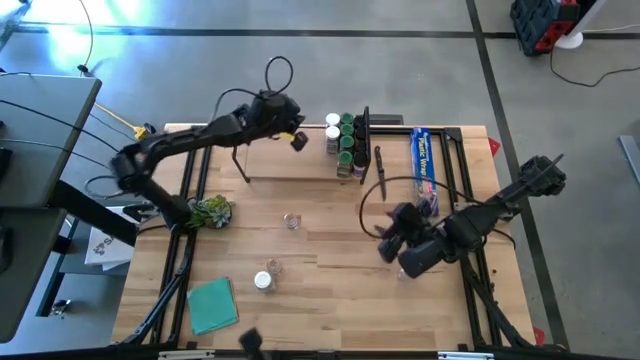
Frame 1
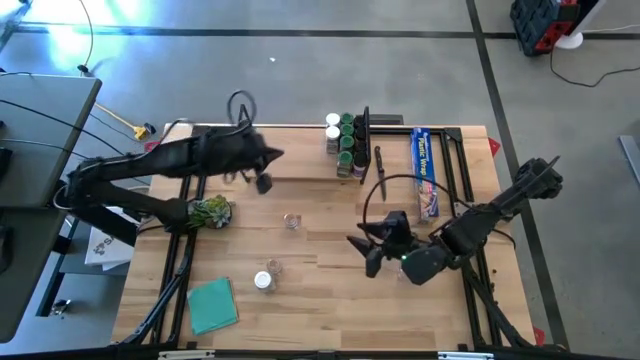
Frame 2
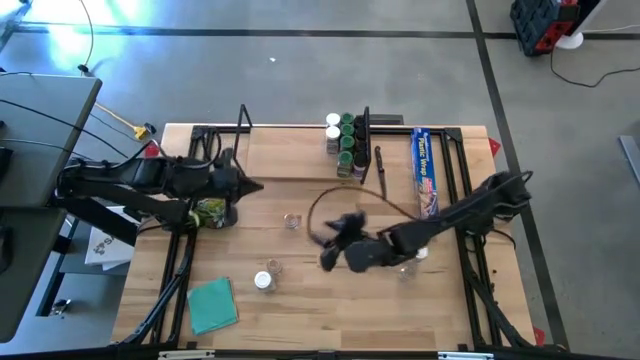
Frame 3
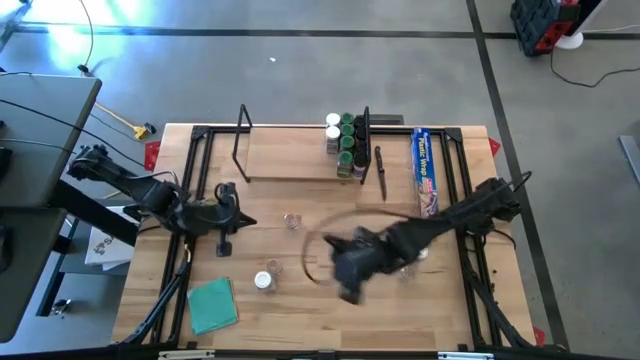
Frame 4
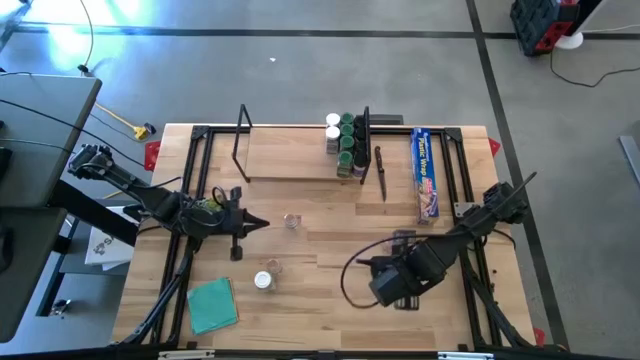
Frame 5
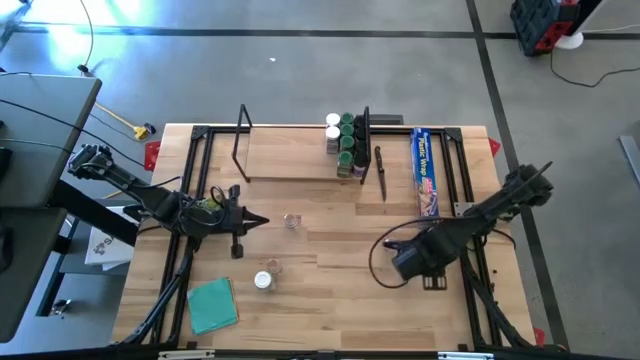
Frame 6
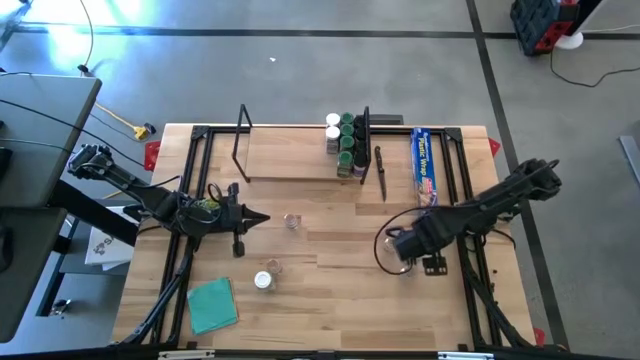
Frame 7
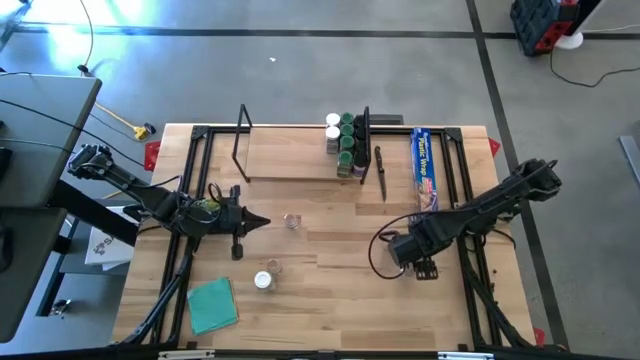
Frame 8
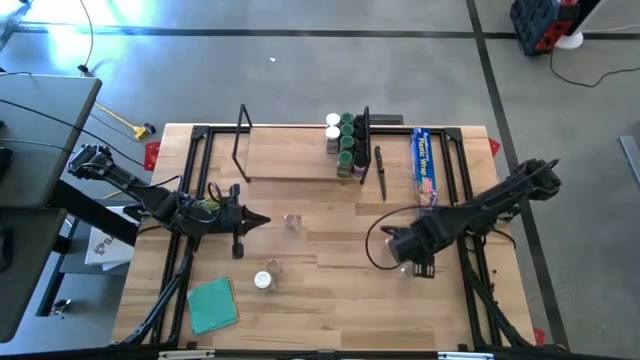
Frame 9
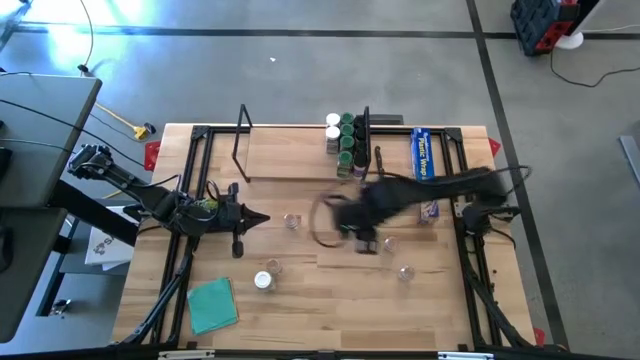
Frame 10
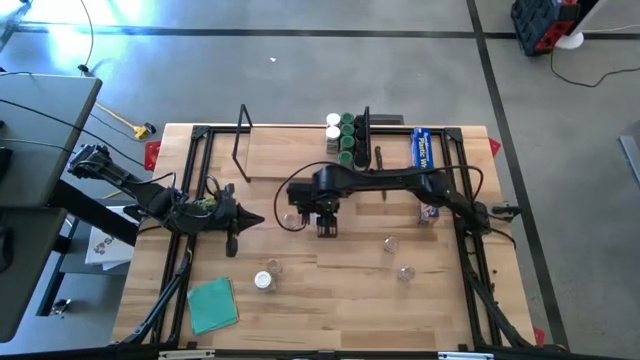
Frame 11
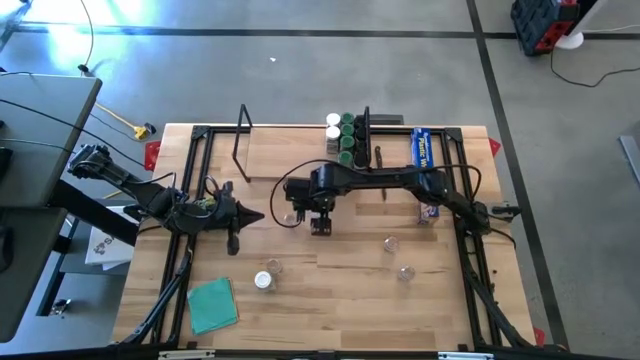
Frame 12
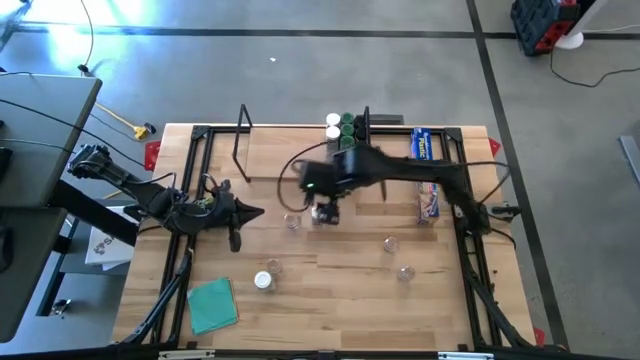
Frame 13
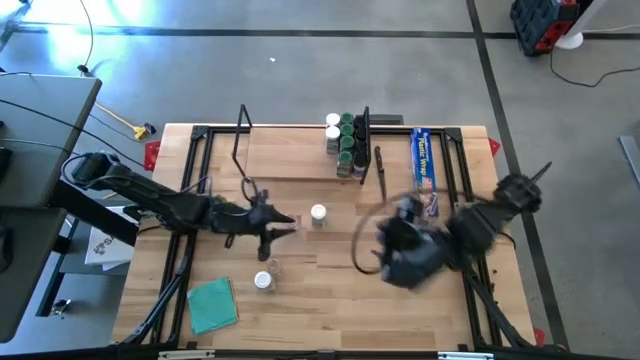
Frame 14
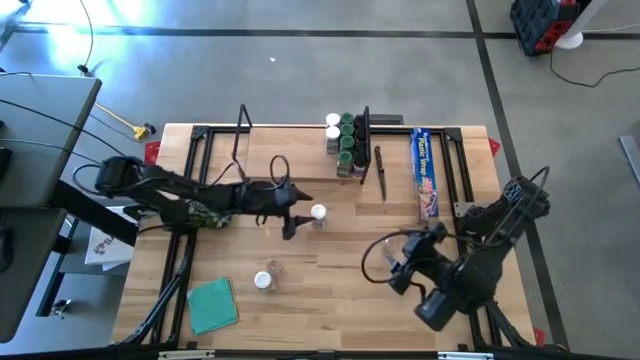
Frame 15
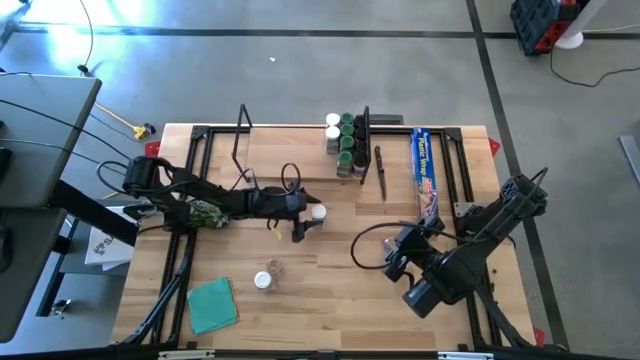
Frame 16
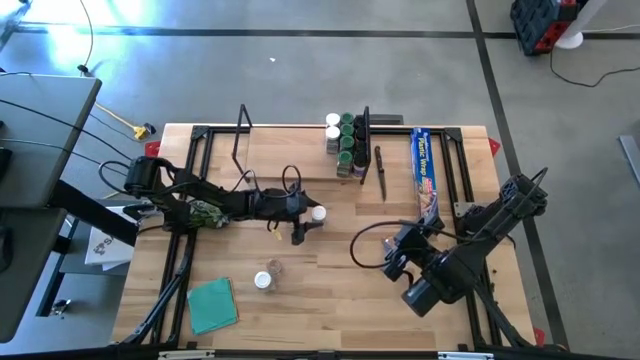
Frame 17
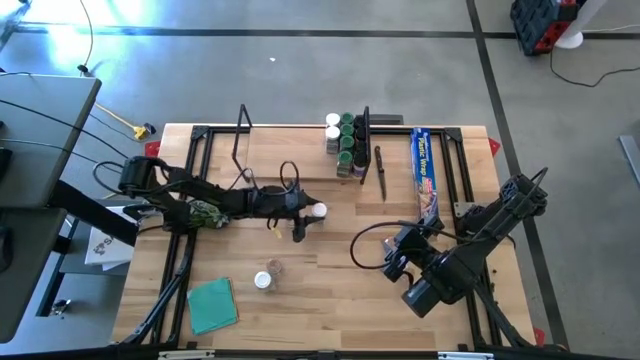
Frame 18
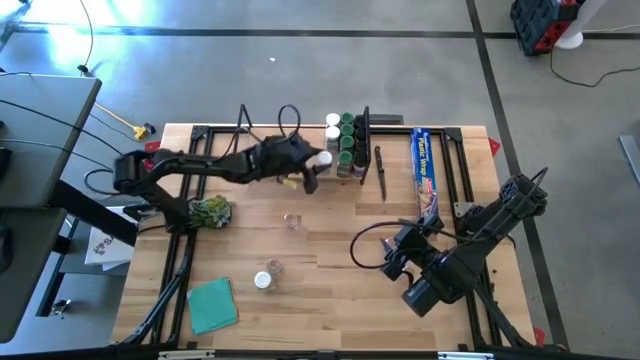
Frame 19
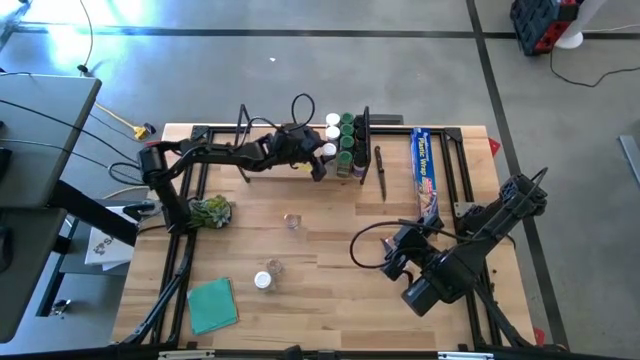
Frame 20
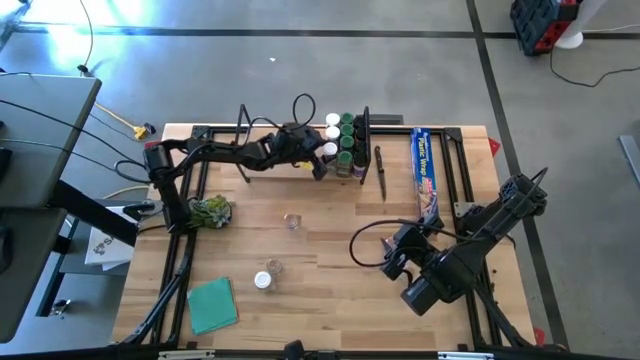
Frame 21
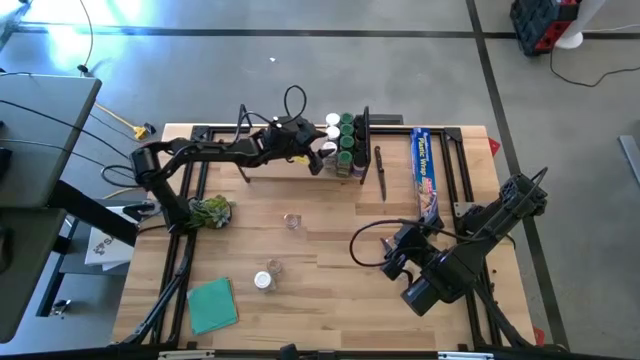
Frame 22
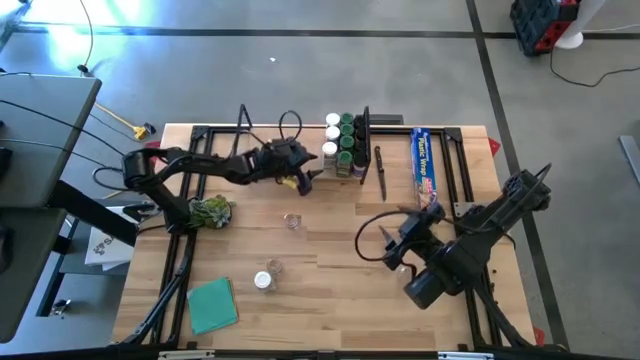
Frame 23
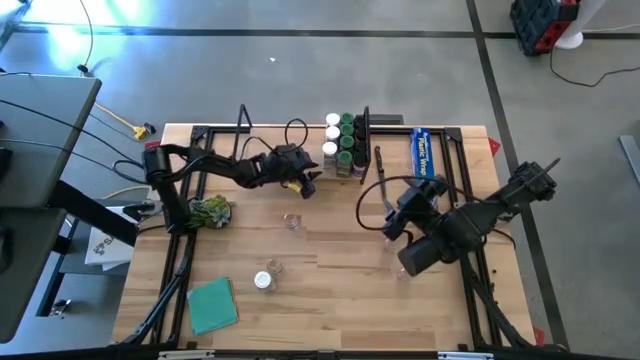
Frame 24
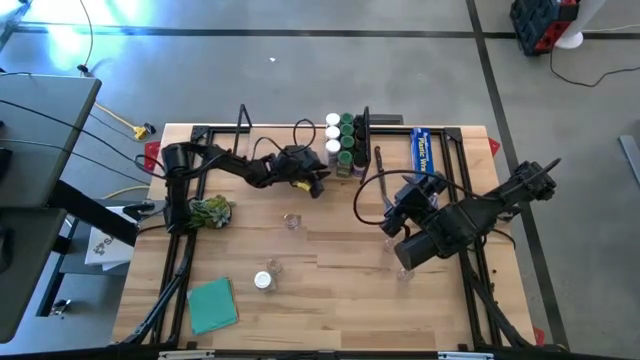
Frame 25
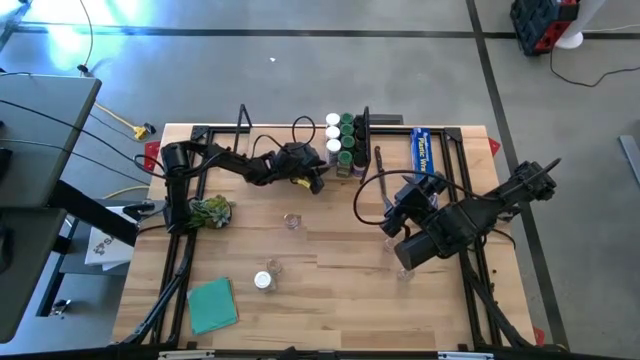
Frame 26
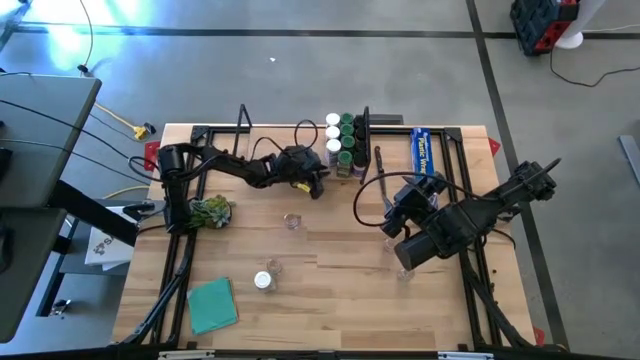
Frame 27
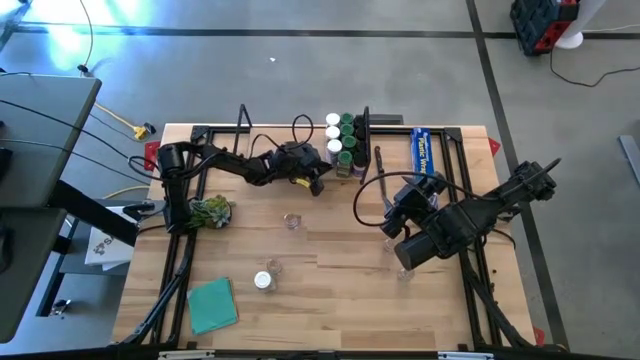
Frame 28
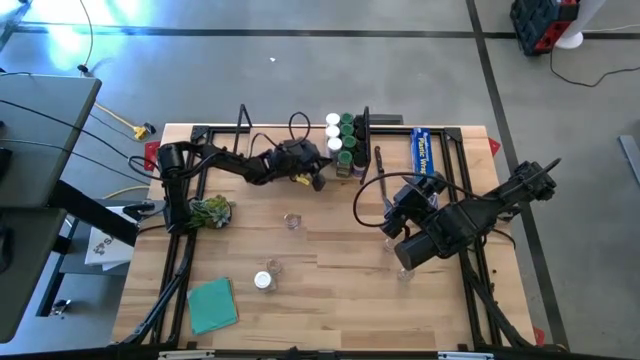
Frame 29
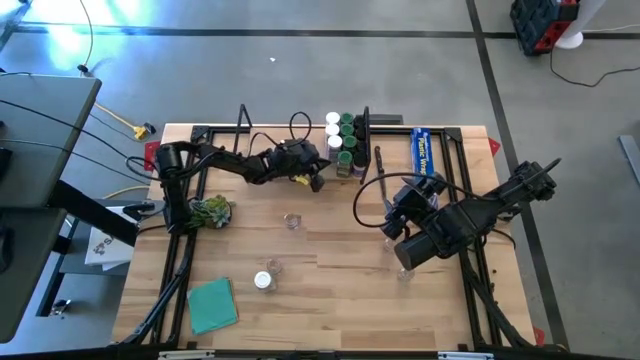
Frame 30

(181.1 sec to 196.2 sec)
Task: Shelf spices
Put the white seasoning bottle on the shelf aligned with the other white seasoning bottles

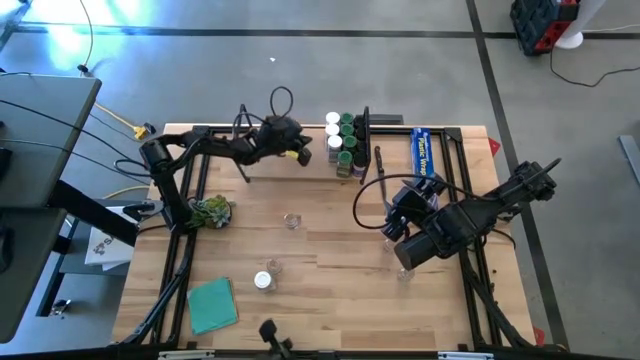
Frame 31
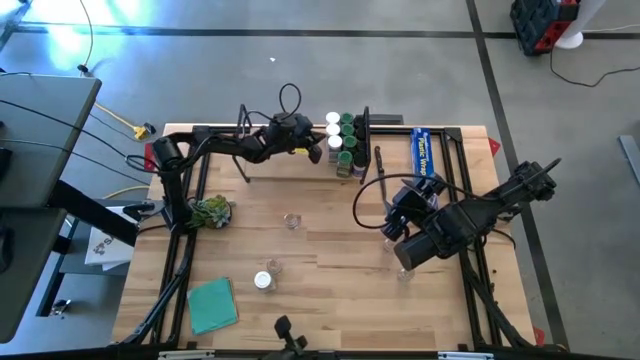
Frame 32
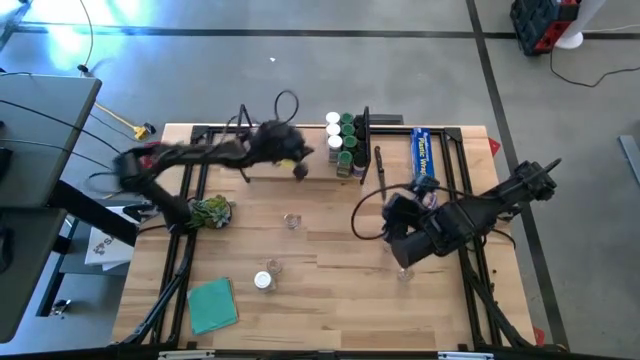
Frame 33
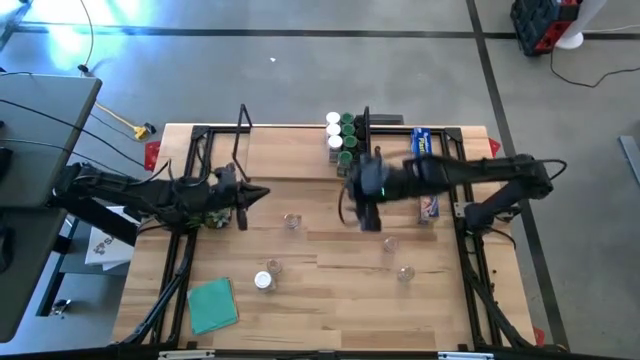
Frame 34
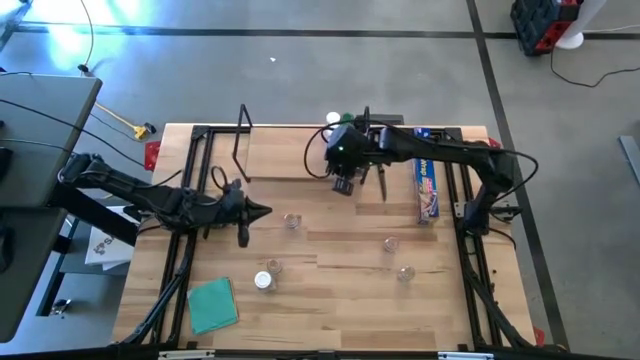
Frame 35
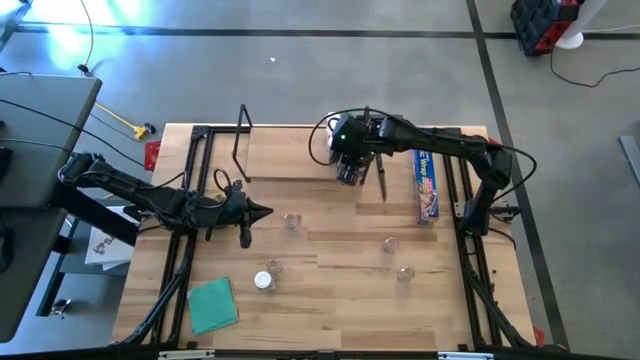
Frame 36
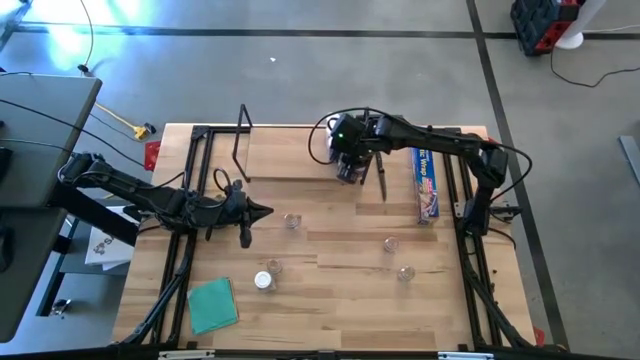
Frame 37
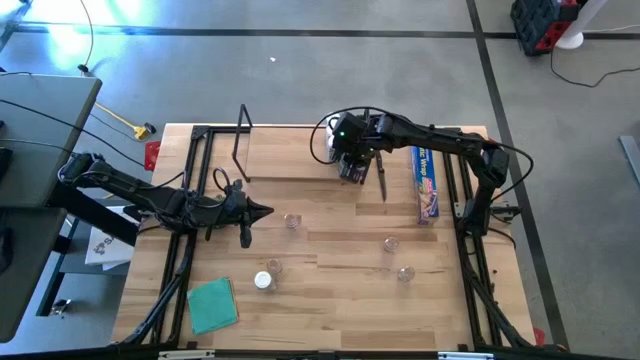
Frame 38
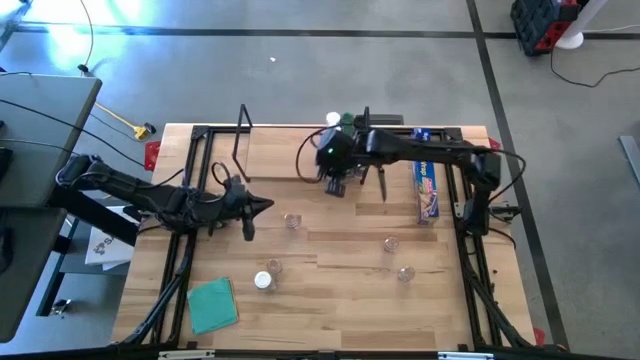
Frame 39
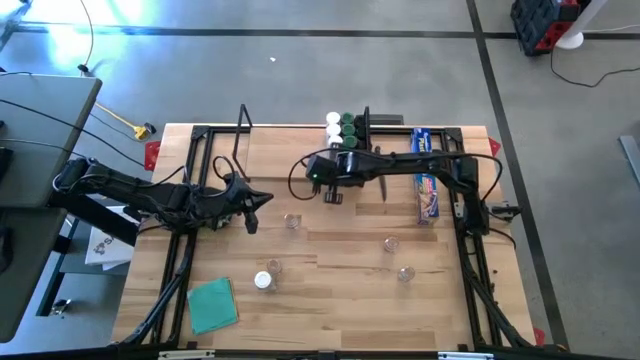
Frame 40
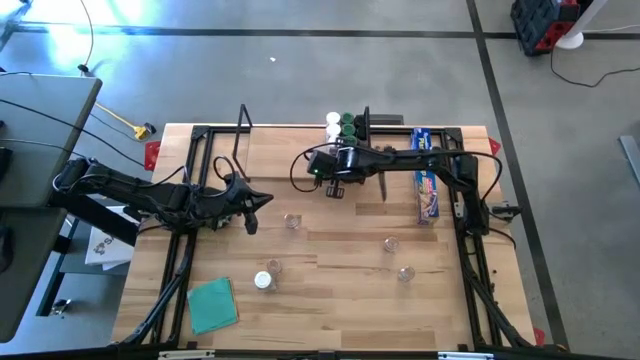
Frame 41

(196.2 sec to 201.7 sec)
Adjust the seasoning bottles on the shelf
